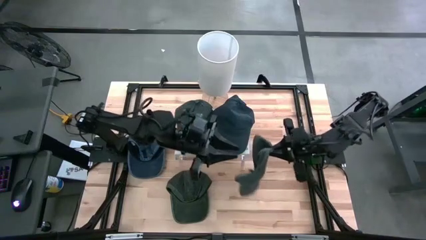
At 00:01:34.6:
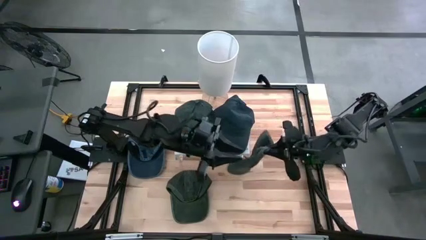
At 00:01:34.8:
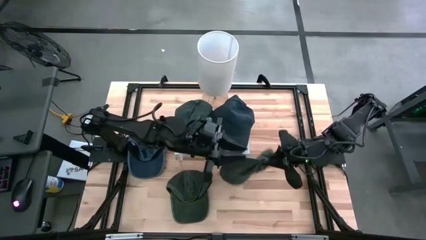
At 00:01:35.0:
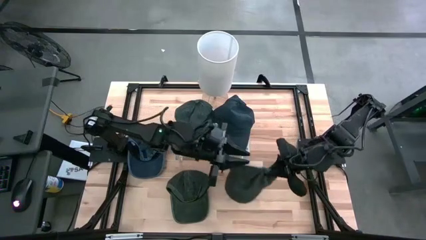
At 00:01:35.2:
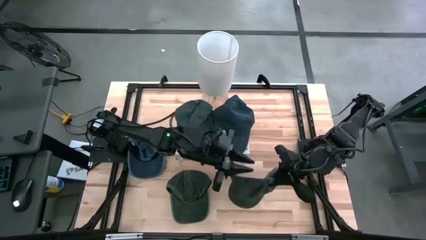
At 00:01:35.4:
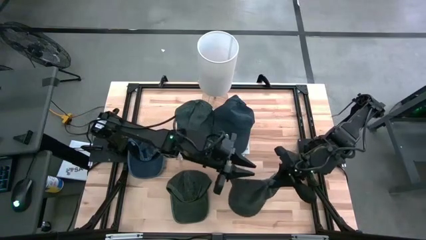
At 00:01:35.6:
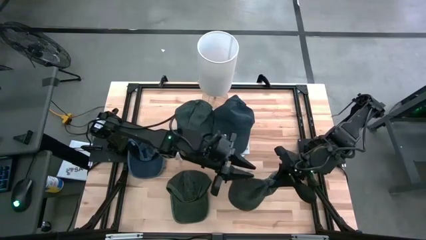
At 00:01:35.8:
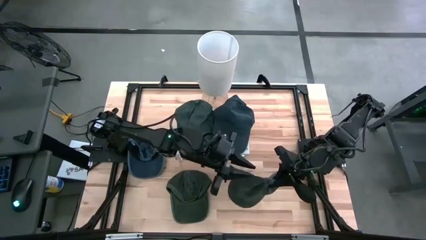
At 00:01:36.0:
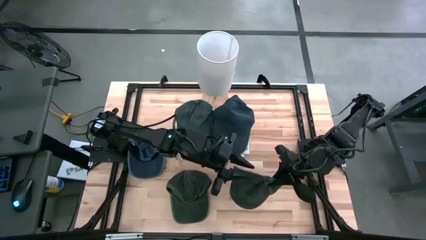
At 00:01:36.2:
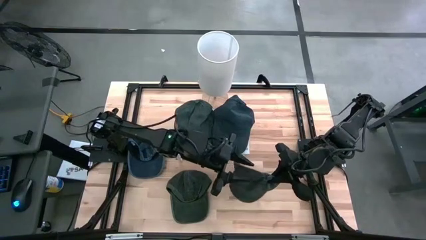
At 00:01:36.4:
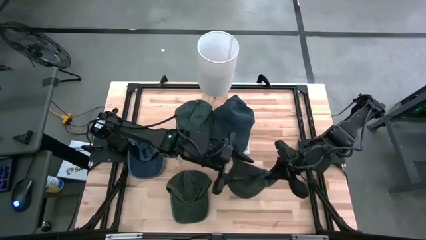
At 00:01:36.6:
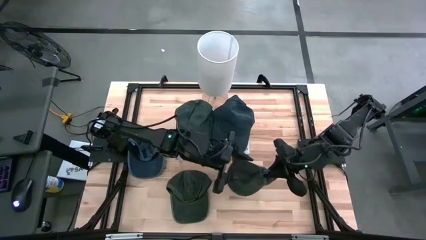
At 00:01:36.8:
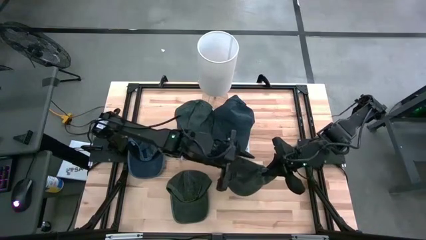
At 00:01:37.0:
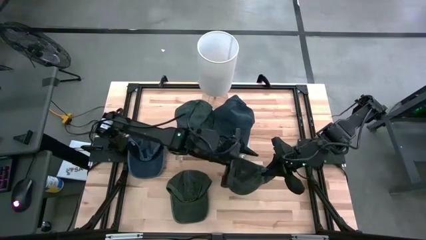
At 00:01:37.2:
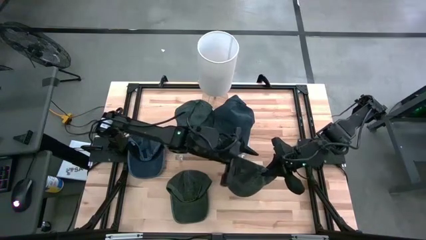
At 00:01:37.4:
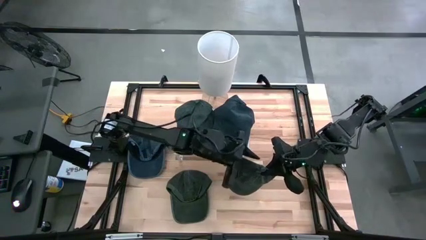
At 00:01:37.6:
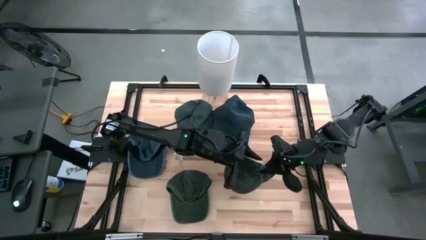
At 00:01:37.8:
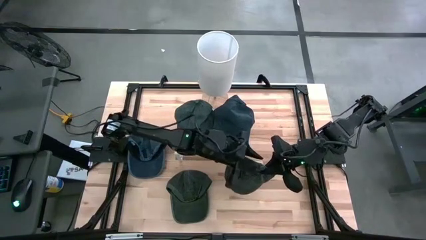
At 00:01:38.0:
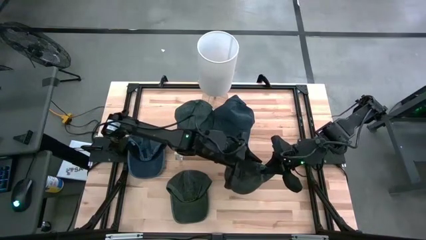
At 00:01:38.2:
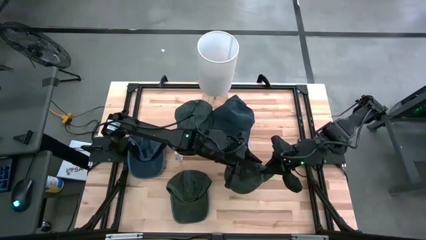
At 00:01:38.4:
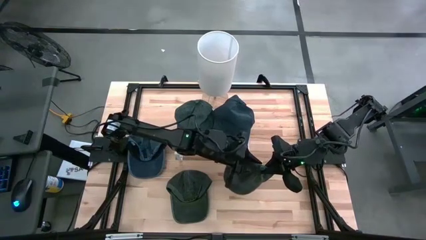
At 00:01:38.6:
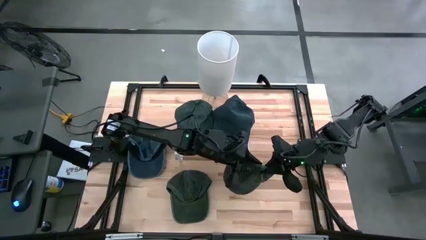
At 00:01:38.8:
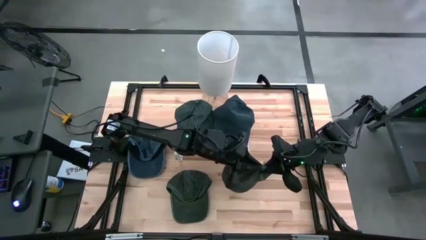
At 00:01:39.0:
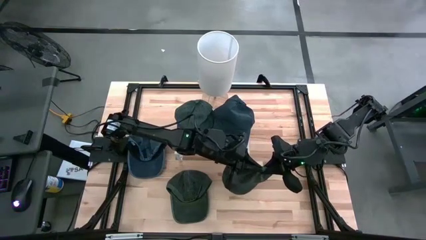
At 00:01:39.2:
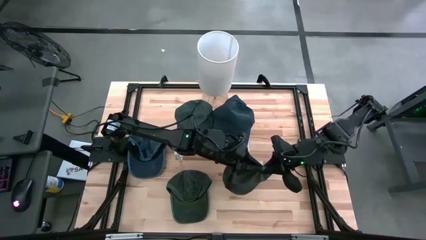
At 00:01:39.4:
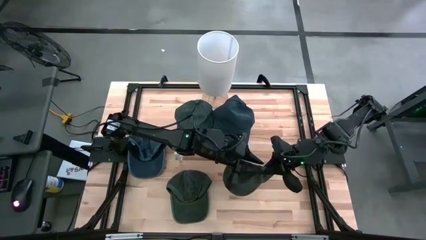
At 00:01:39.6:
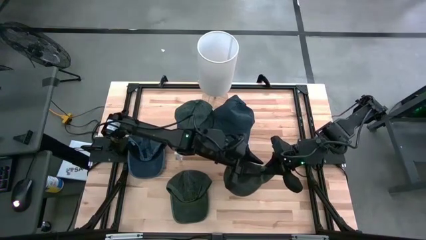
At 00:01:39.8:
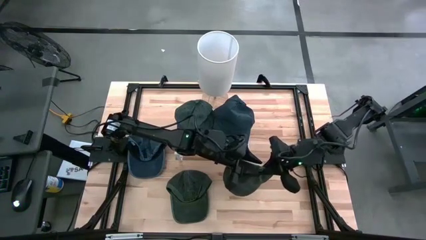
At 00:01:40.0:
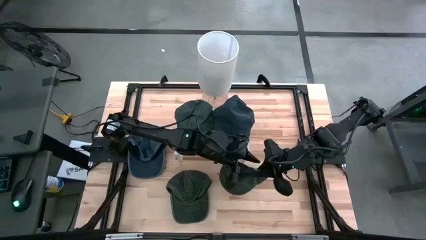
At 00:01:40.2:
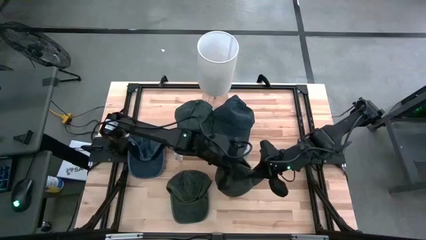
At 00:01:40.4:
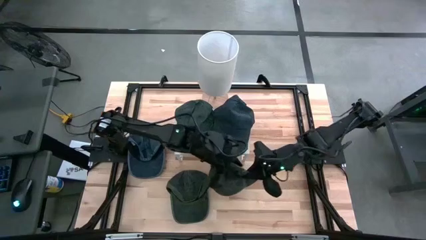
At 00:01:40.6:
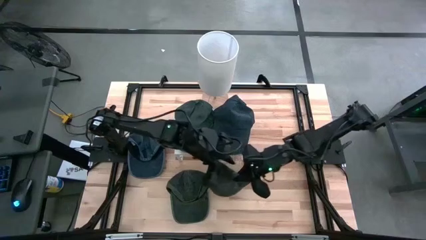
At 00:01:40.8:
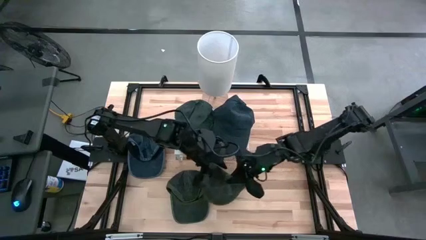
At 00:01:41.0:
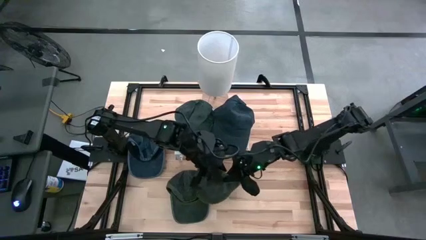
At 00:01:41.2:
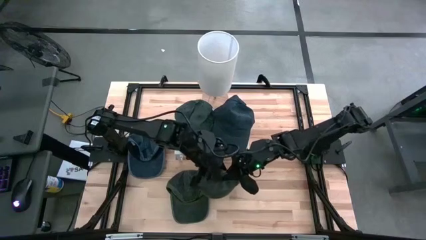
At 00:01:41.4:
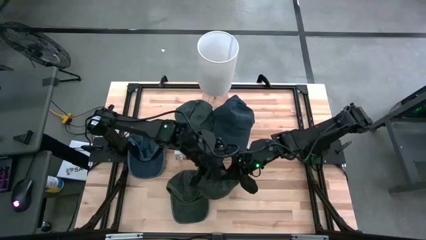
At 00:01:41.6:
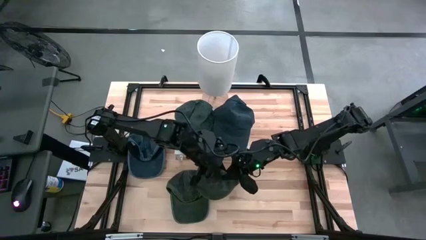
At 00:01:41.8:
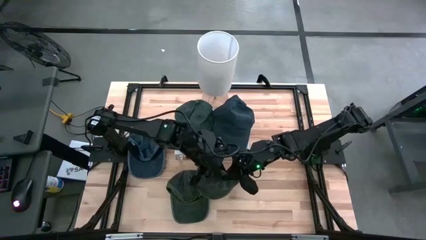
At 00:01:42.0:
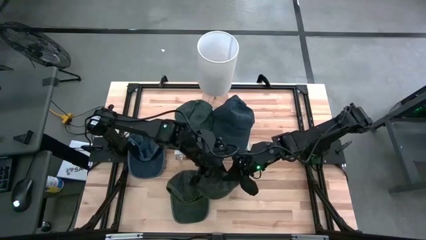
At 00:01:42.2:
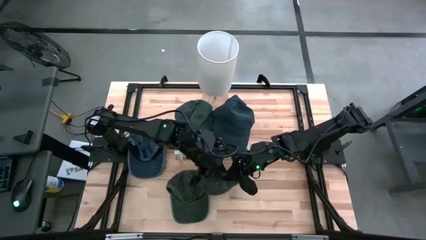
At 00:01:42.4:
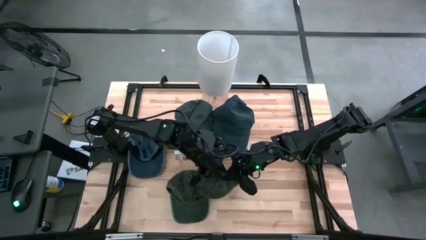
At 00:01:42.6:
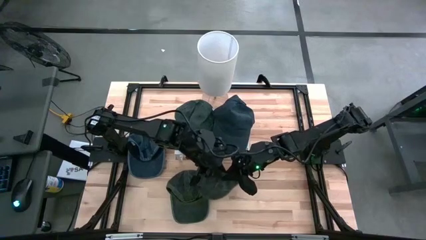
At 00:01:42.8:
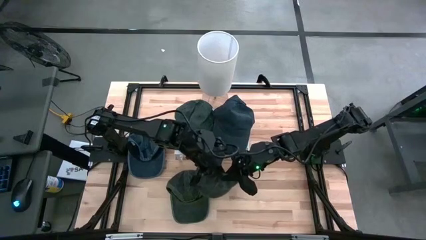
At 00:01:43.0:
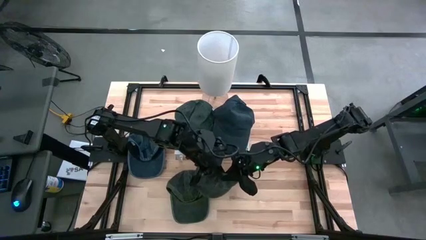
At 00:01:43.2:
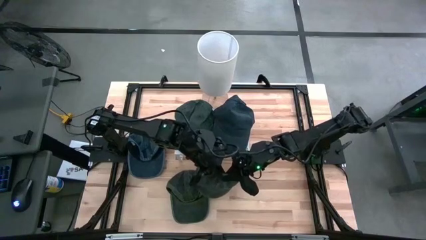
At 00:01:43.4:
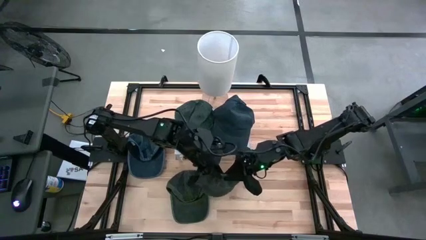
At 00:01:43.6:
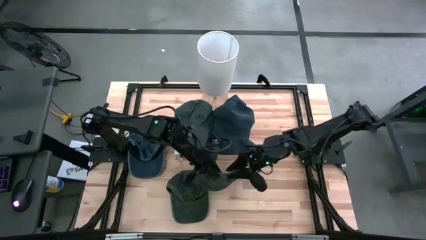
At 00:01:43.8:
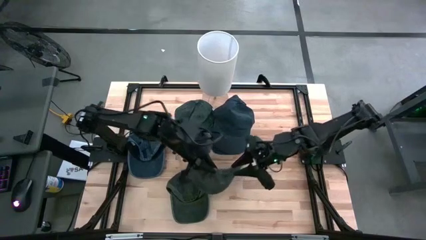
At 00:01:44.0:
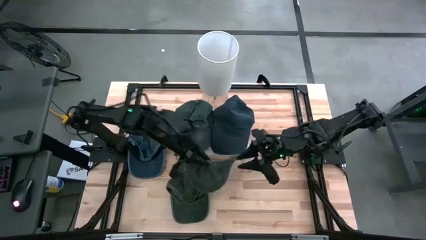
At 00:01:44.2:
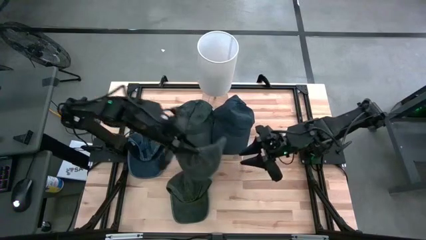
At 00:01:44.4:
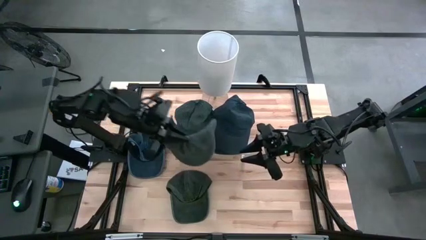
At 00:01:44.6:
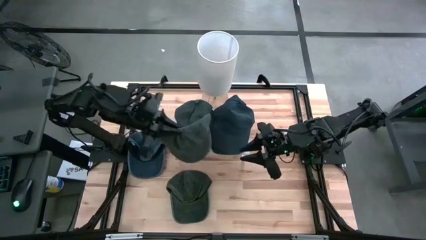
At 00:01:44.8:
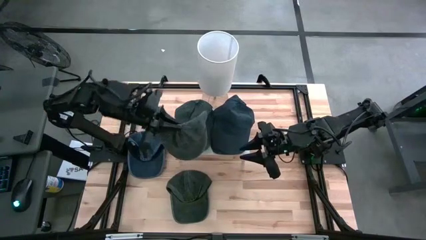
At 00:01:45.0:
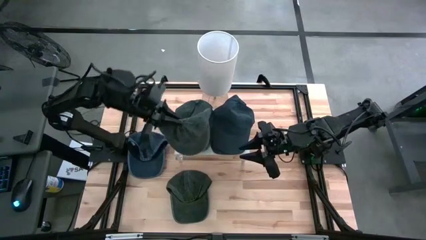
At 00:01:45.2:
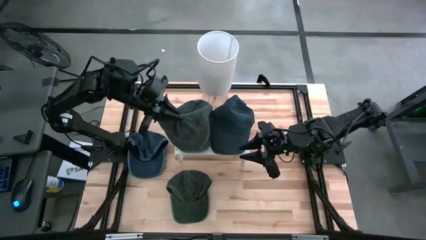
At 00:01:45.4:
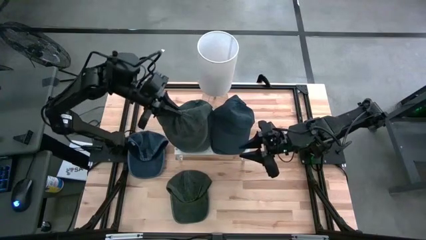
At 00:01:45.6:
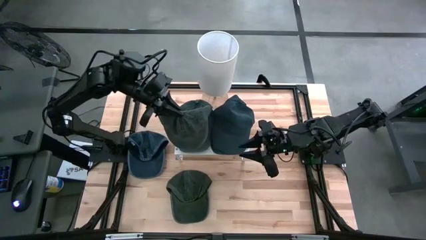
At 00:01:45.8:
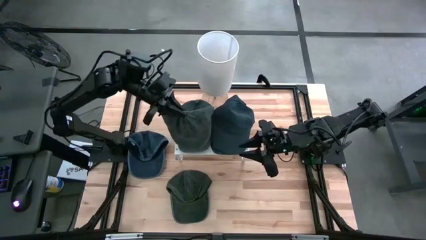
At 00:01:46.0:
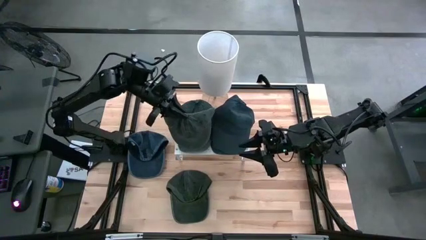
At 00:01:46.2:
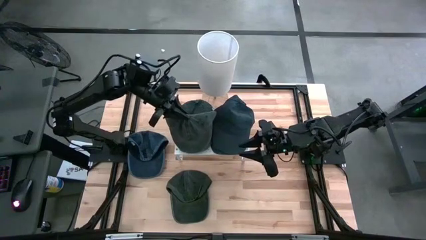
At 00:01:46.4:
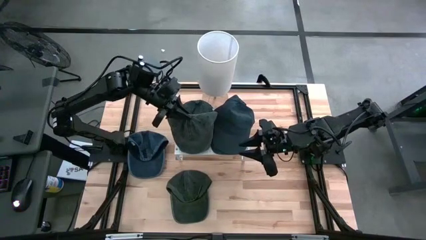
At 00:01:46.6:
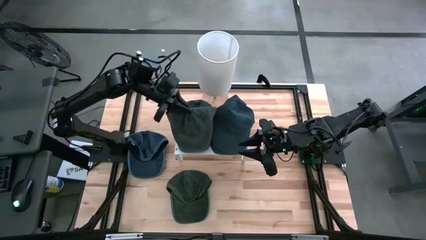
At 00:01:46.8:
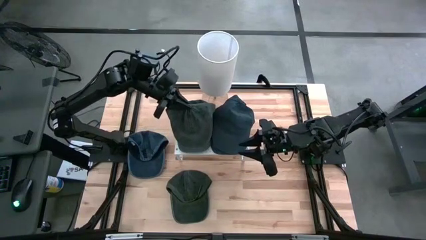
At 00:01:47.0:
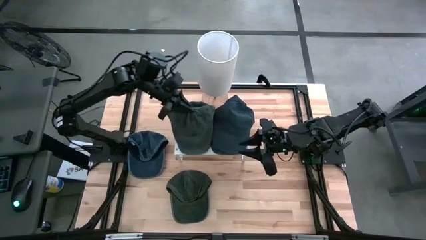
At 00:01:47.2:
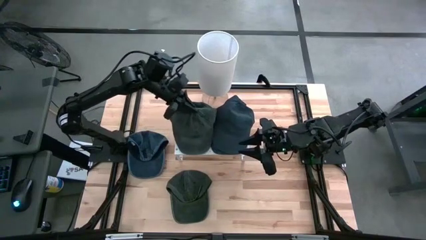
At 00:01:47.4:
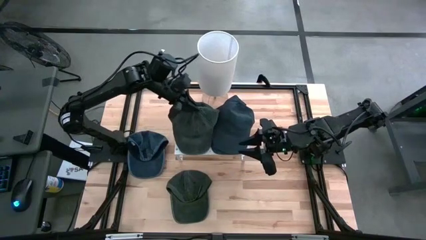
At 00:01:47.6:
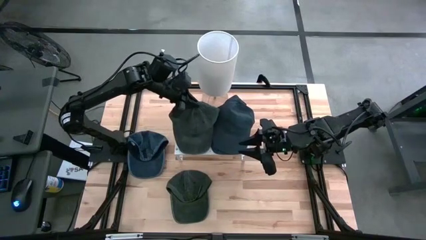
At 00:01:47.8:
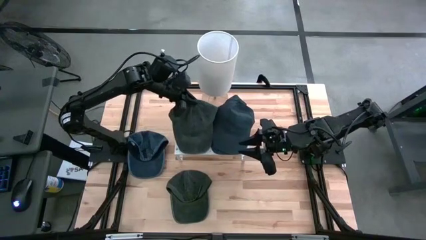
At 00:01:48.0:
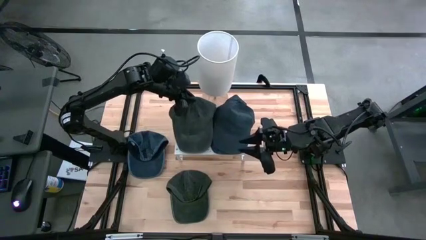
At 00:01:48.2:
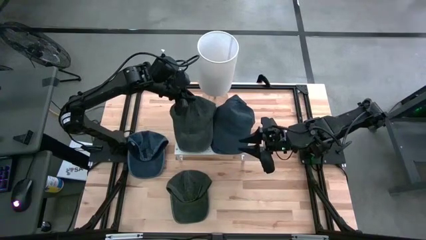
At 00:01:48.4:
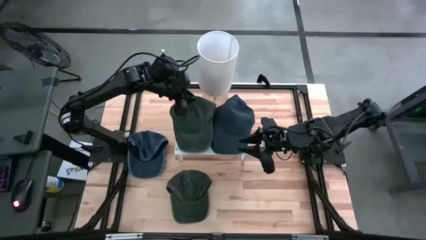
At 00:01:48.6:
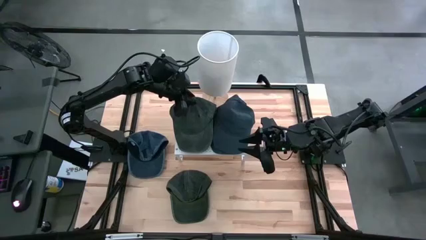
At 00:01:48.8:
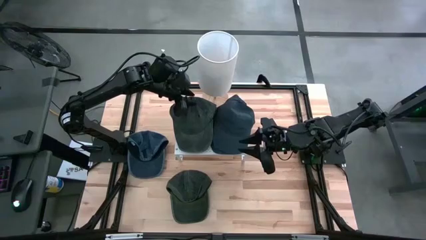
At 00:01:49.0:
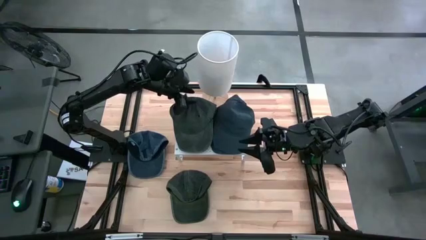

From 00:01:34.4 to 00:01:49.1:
Task: Pick & Place hat
Stack the top green cap on the green cap on the shelf
